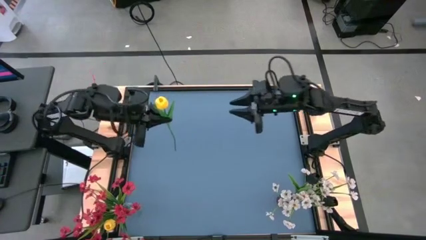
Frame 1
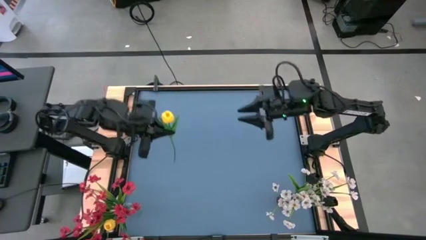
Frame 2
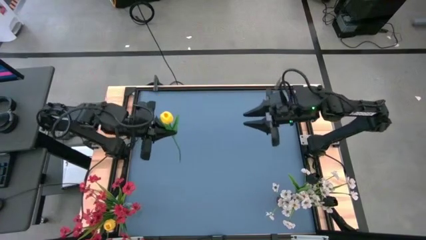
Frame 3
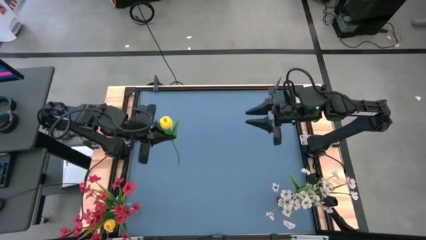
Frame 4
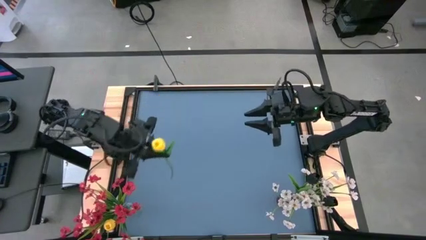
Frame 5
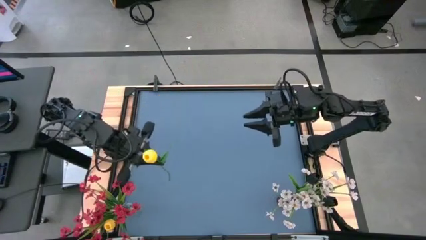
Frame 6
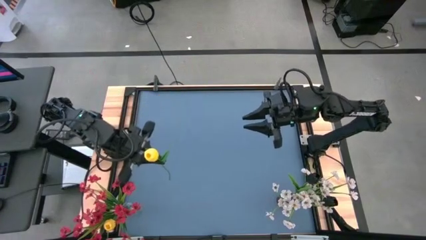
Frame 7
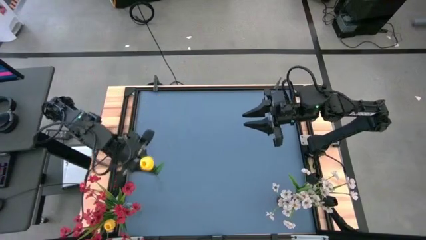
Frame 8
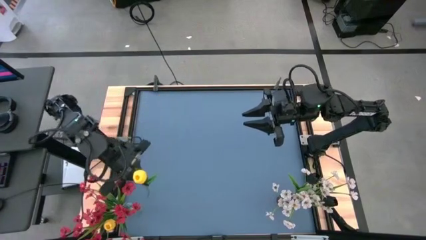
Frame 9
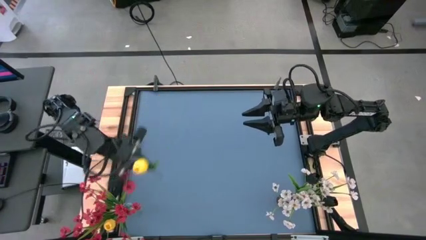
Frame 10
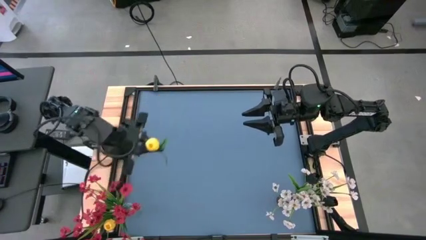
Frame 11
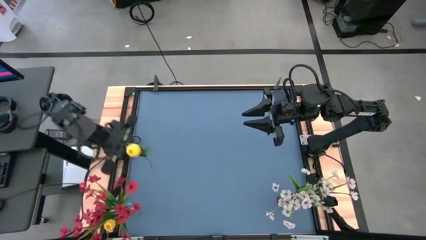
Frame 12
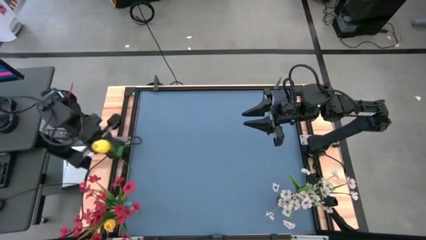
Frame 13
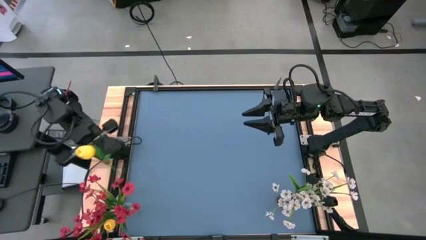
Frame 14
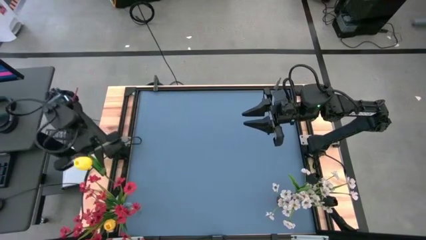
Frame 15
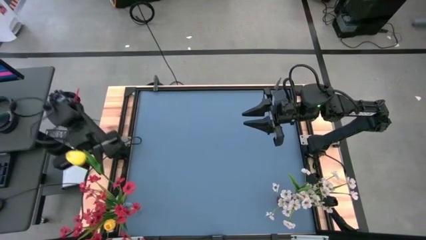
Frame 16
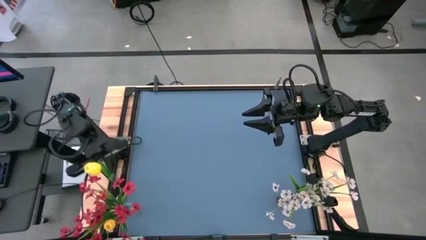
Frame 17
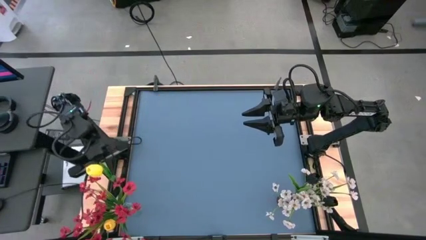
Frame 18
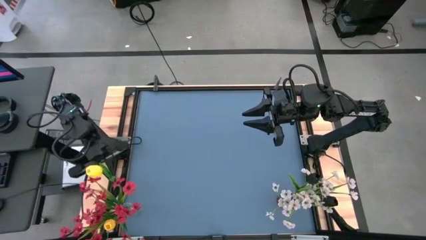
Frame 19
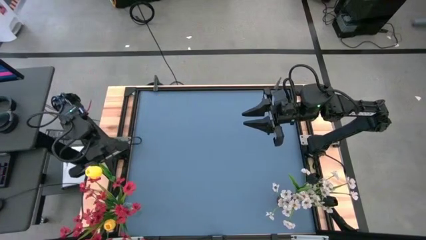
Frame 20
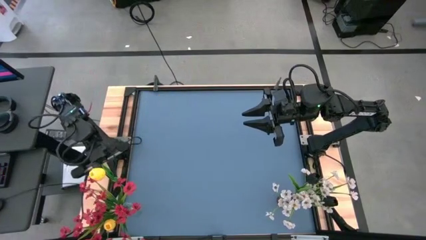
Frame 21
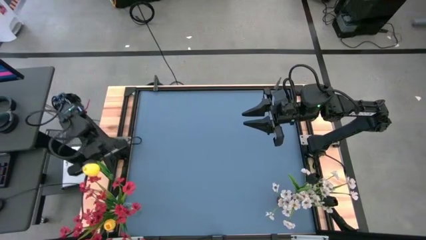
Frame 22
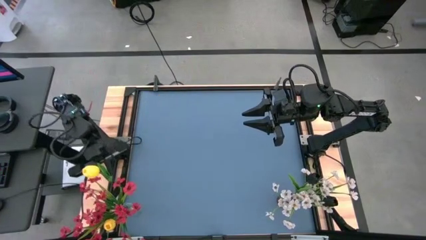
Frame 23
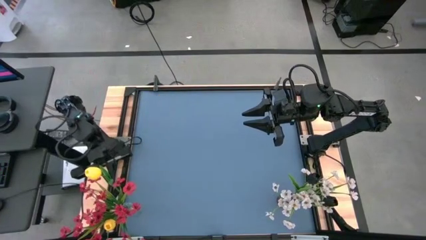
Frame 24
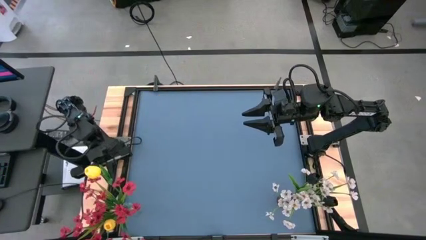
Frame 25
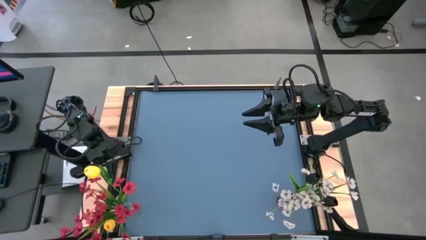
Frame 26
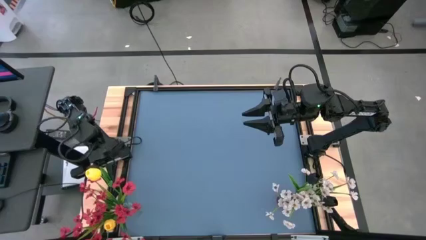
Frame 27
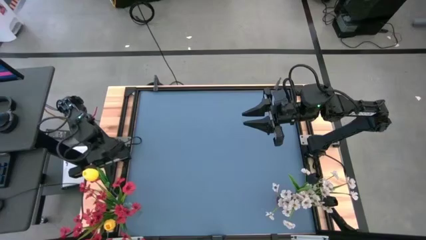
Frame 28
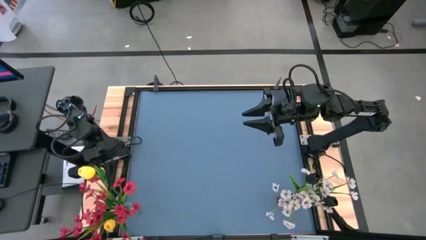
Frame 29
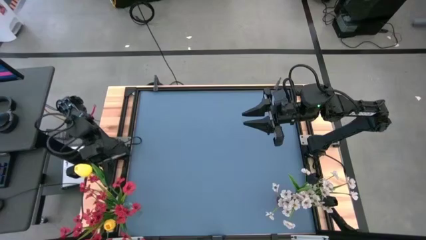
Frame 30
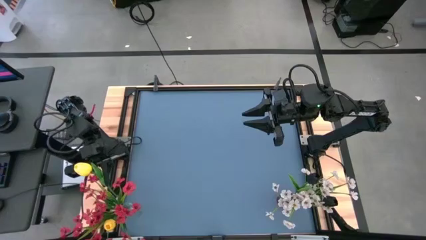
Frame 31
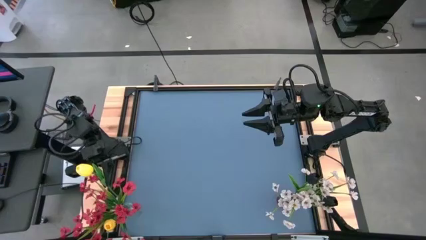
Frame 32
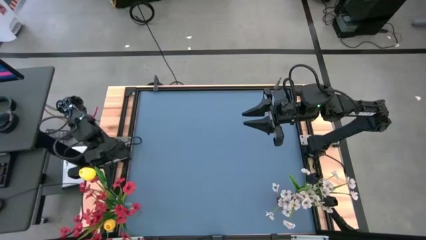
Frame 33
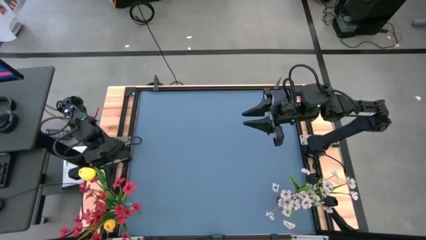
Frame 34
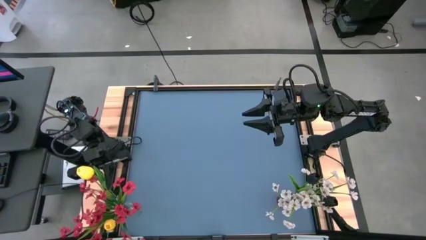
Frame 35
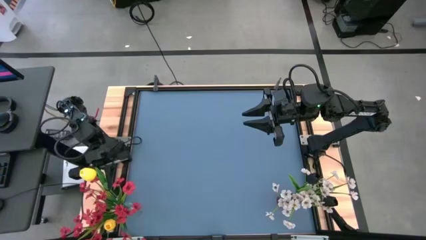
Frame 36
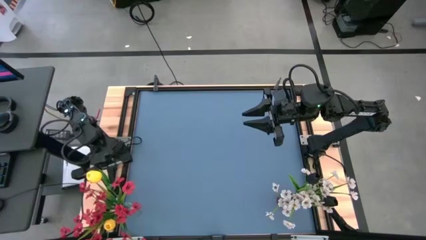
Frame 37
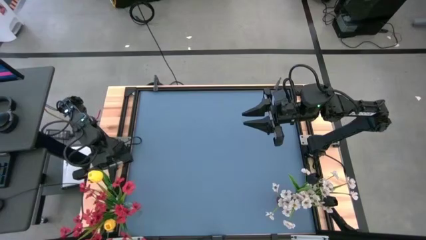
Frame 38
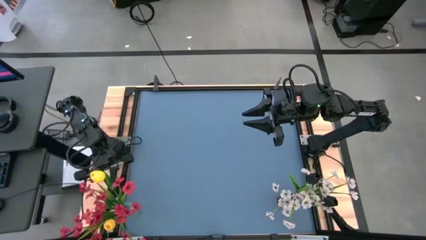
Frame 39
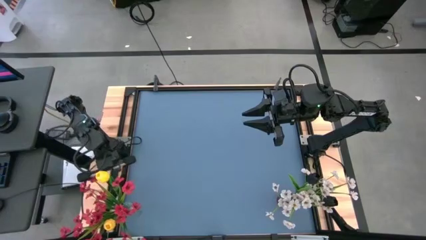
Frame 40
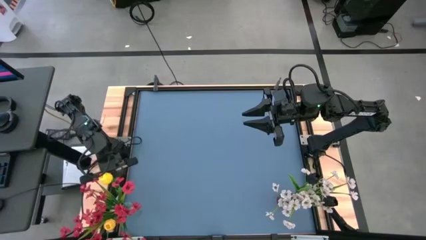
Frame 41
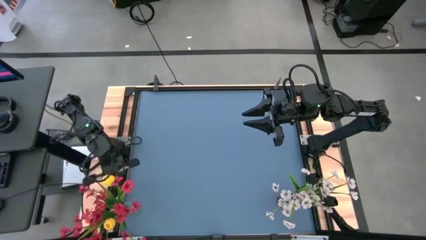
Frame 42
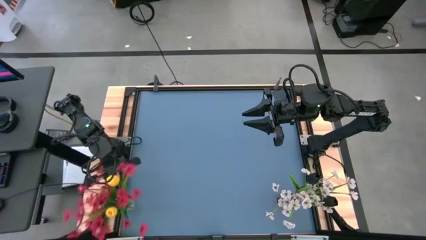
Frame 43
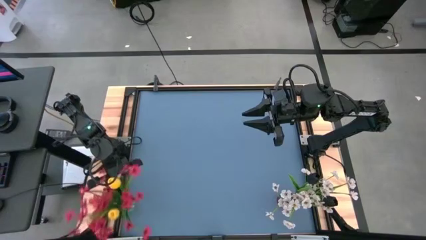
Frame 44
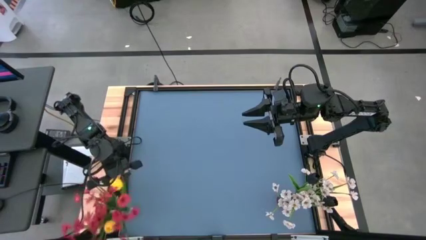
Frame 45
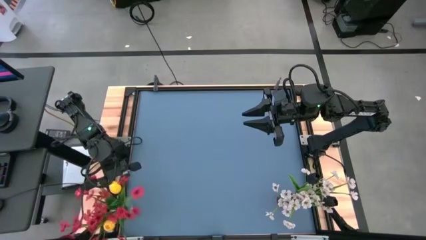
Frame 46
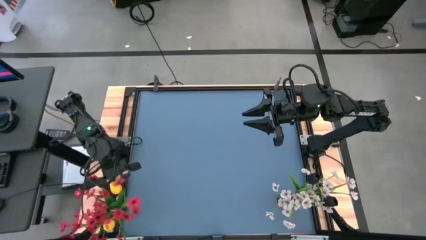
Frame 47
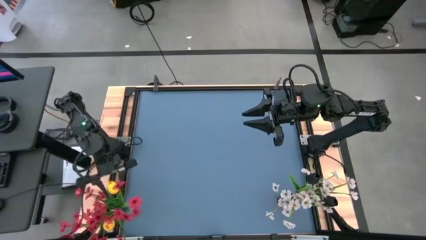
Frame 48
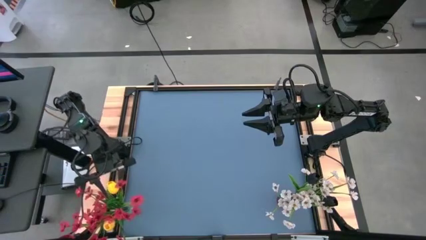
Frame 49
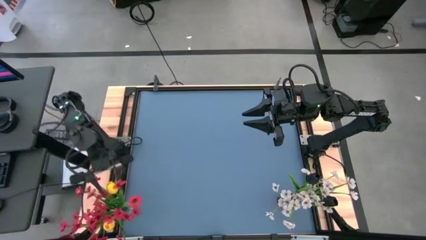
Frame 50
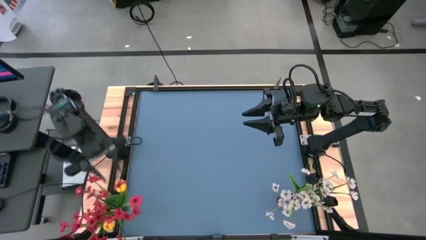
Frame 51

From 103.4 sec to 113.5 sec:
Task: Sort flowers into vase by color
Put the yellow tulip into the transparent vase

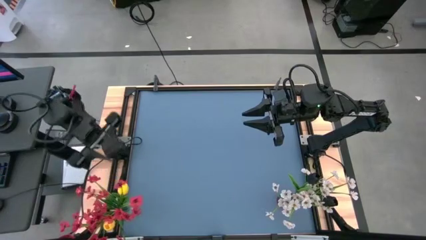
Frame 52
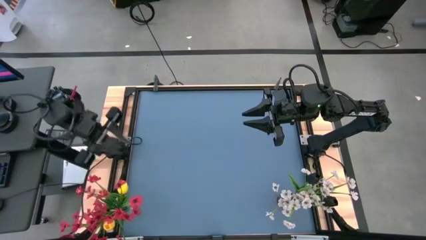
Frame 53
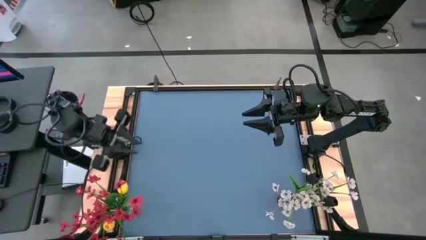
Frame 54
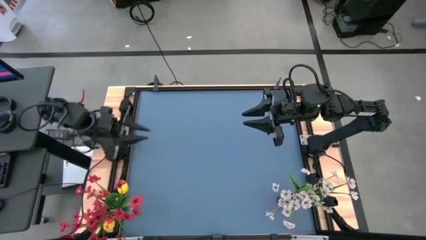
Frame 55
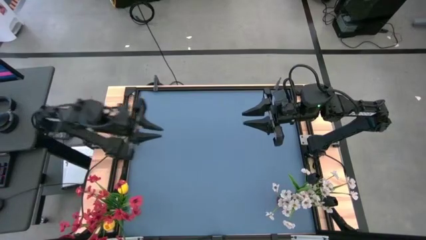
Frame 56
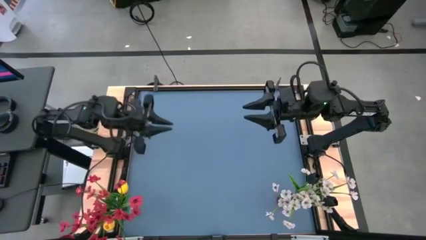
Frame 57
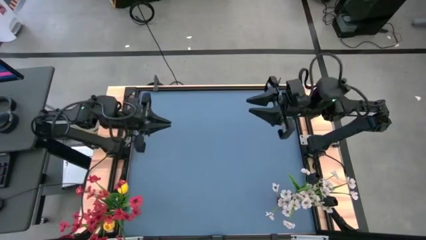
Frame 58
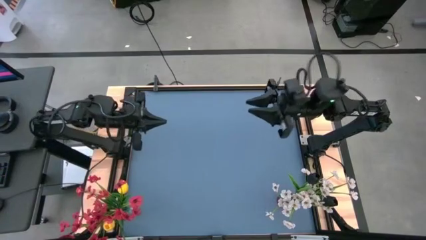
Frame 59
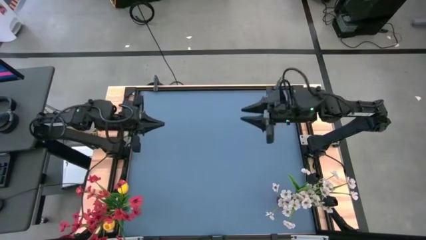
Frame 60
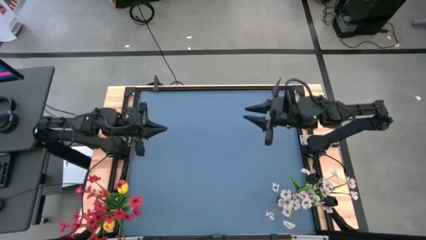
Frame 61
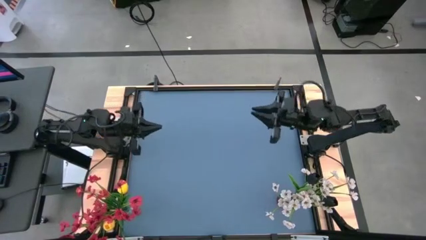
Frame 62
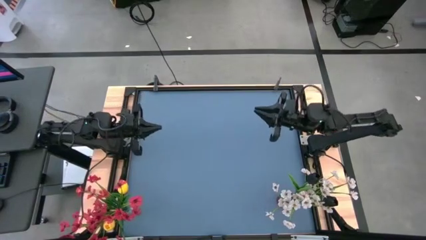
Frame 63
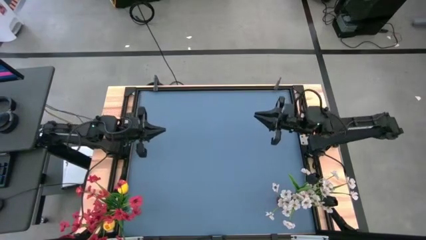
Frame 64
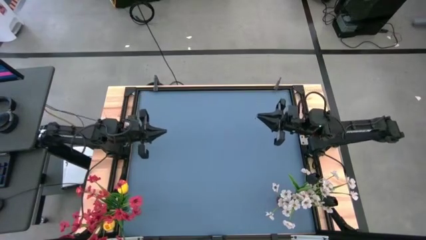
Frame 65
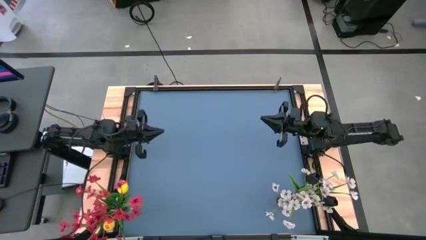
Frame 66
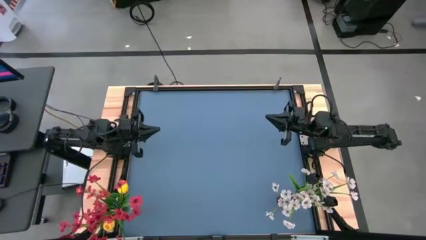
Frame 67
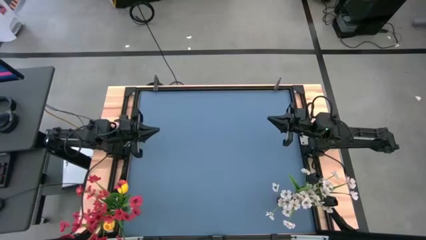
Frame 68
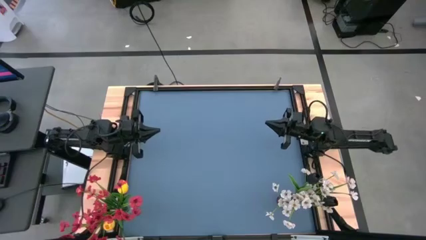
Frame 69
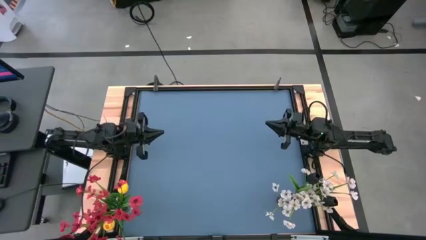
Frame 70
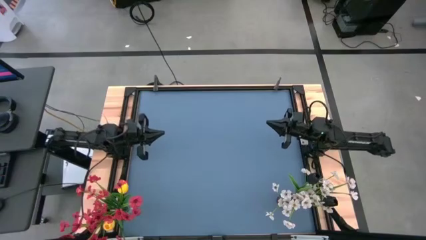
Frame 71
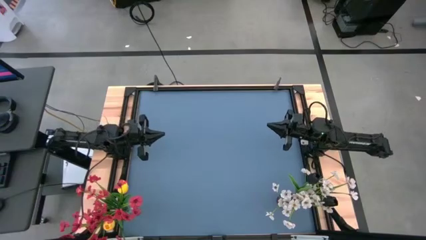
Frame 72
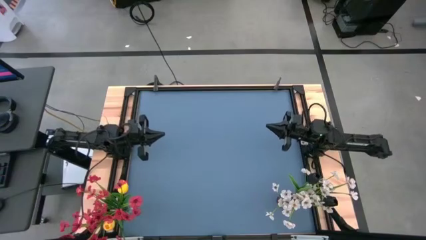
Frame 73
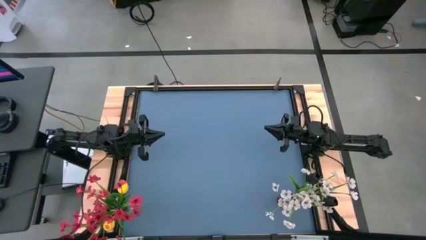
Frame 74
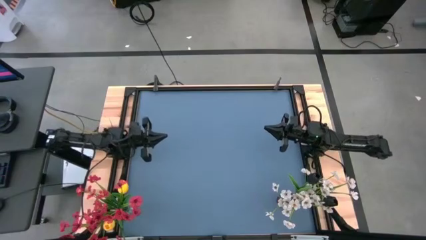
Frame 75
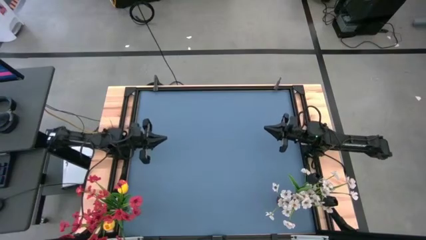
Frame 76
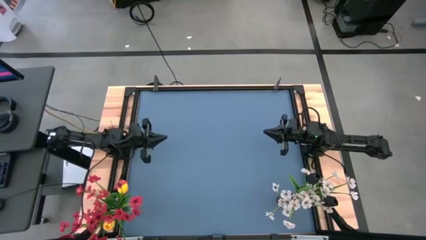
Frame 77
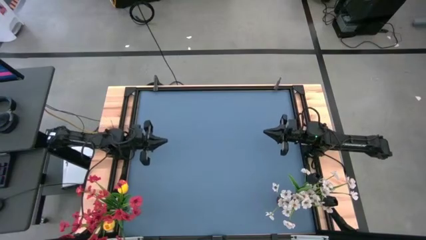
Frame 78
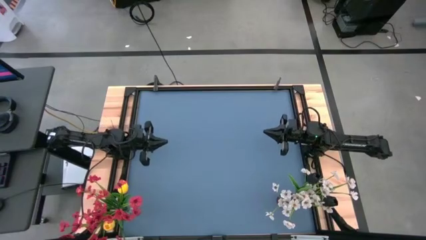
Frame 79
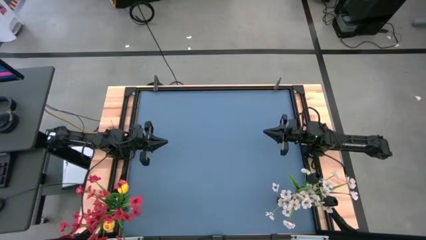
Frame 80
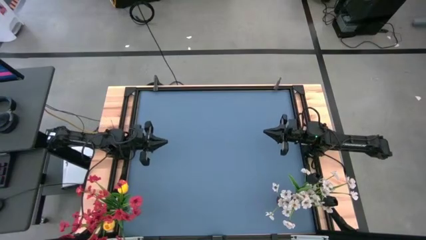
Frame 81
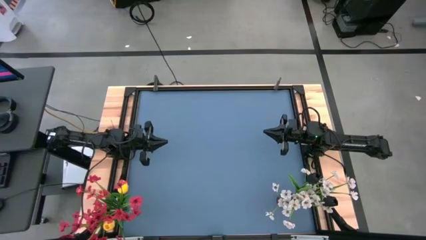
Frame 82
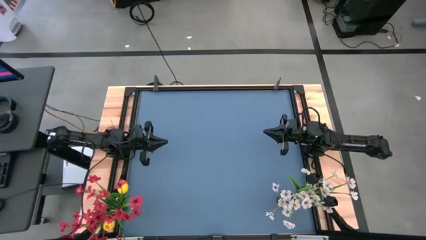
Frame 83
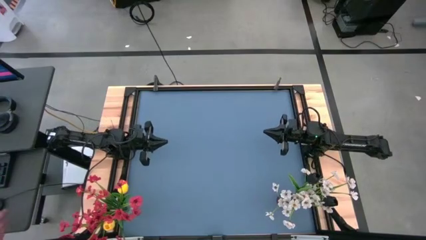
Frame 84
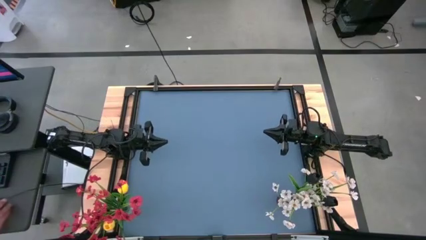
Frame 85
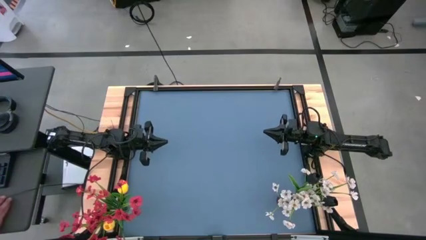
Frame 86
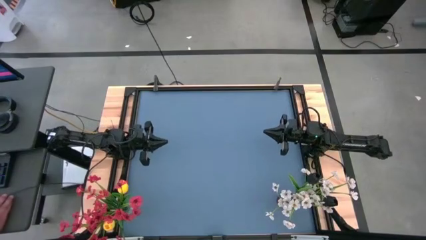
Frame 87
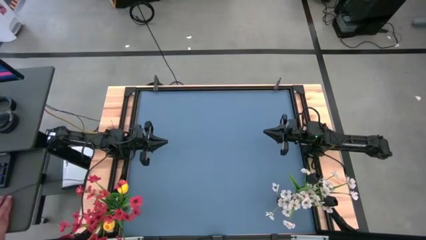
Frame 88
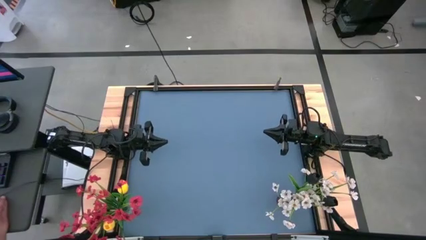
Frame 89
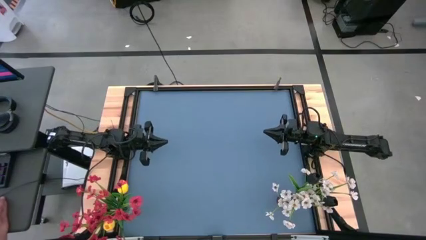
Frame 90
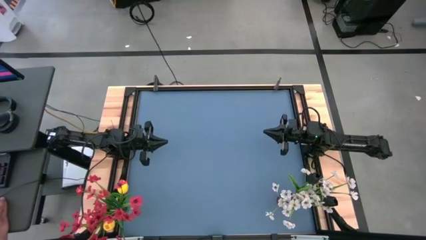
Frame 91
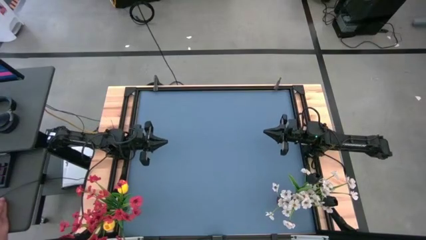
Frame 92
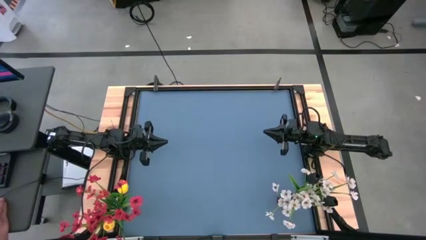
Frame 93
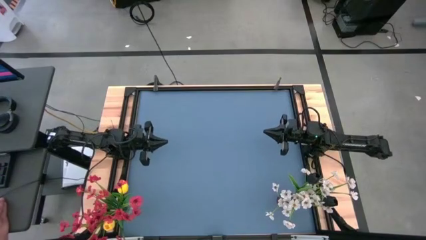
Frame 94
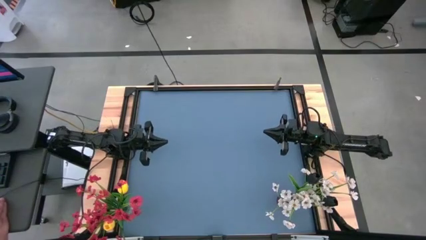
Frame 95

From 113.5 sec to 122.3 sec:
Return to Home Position
